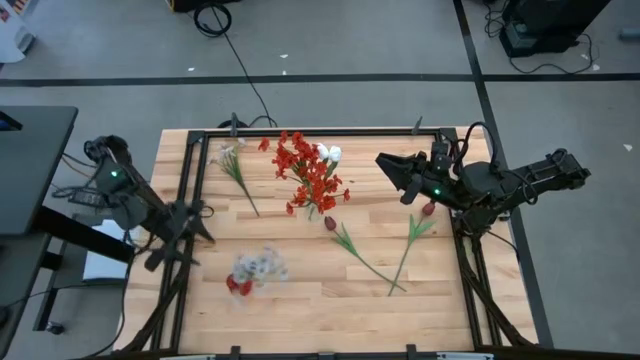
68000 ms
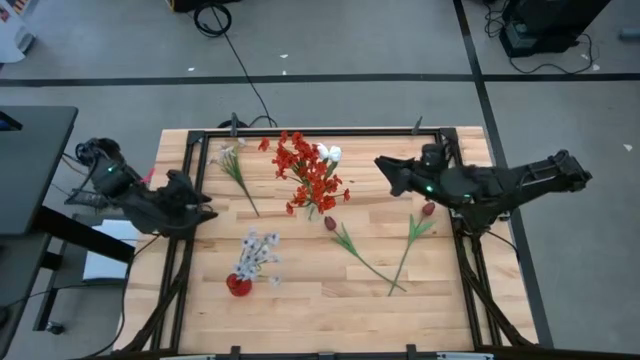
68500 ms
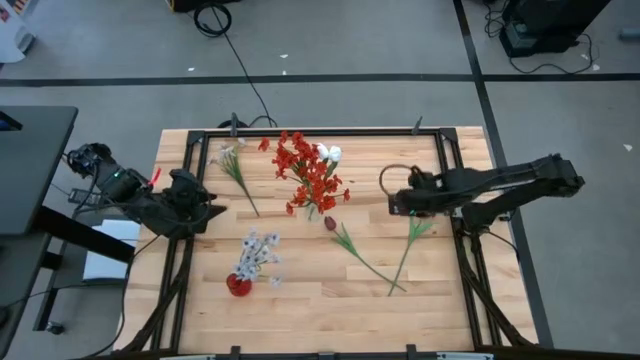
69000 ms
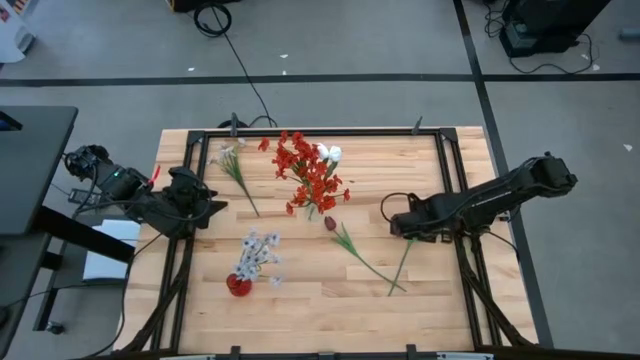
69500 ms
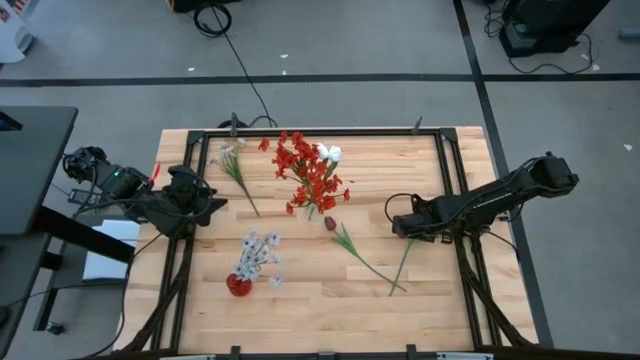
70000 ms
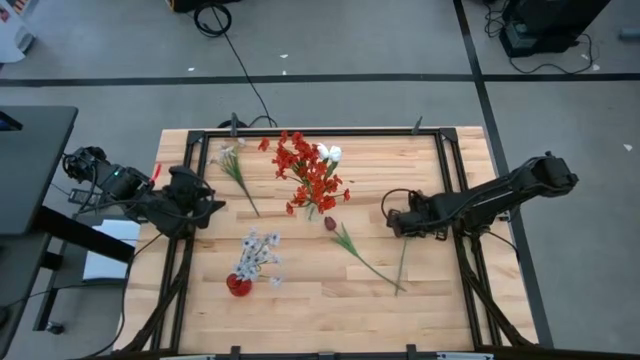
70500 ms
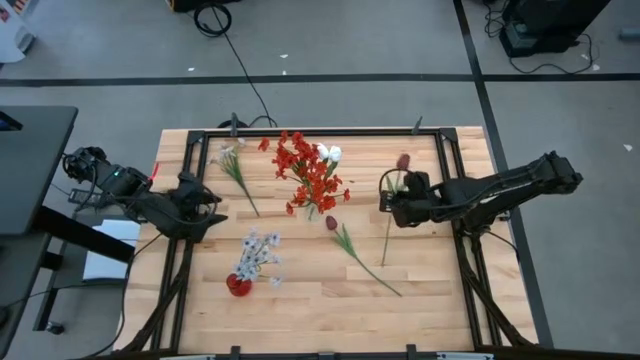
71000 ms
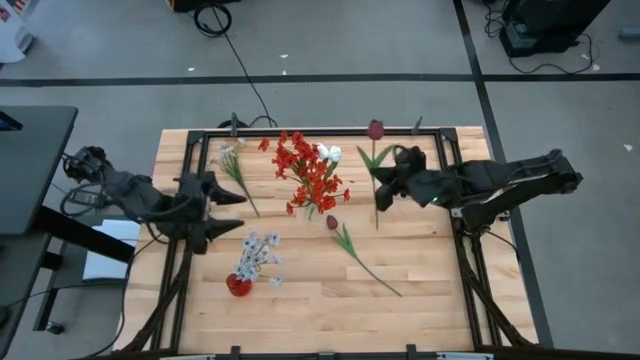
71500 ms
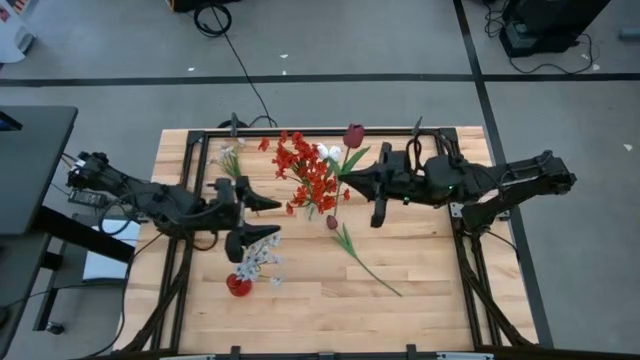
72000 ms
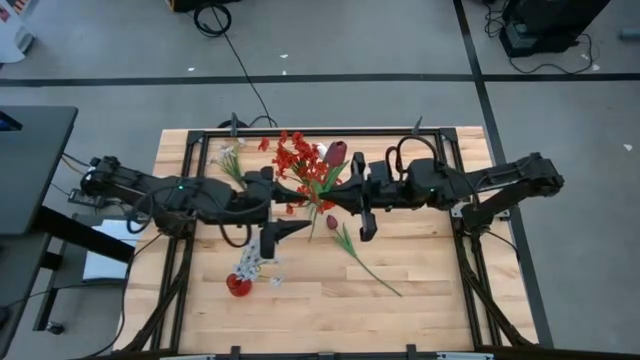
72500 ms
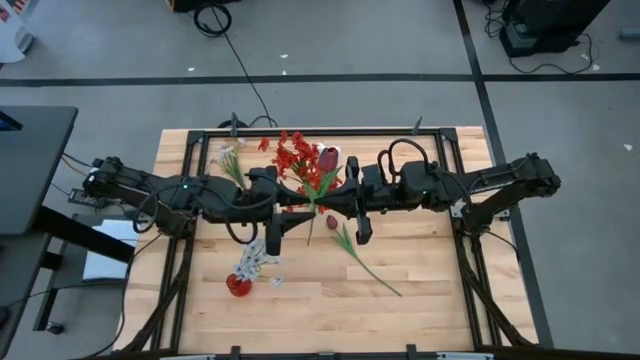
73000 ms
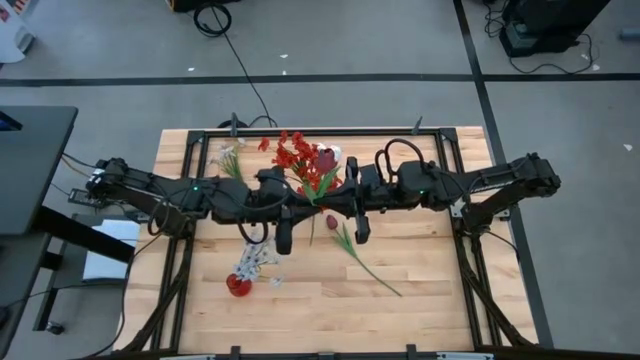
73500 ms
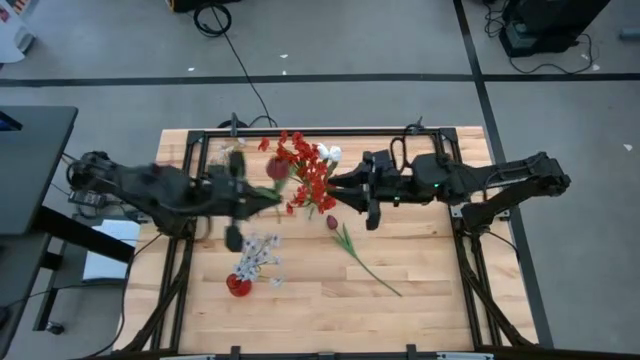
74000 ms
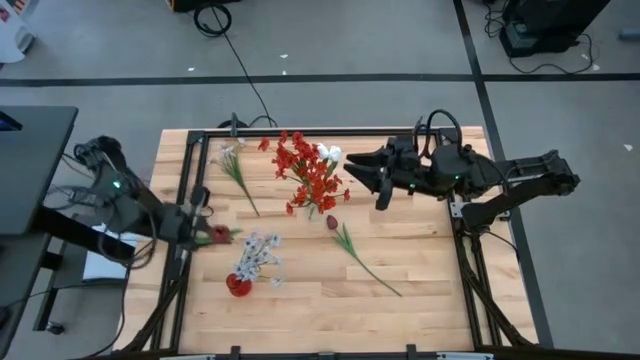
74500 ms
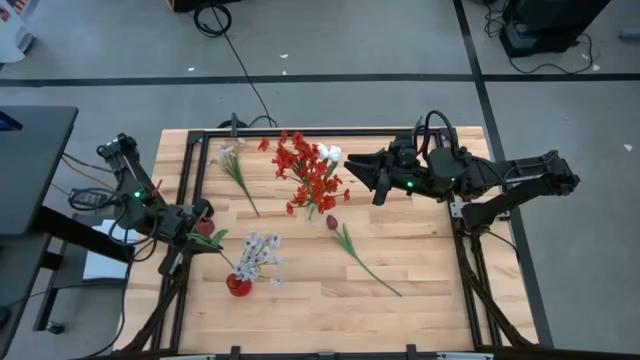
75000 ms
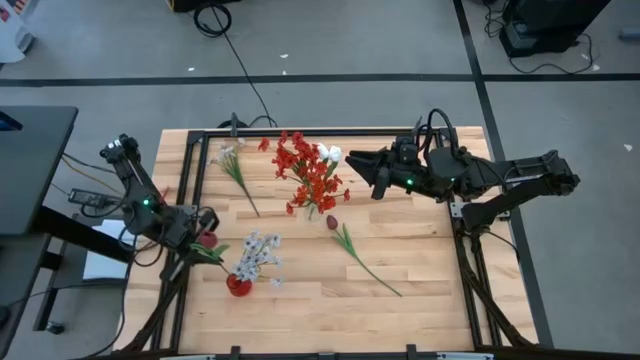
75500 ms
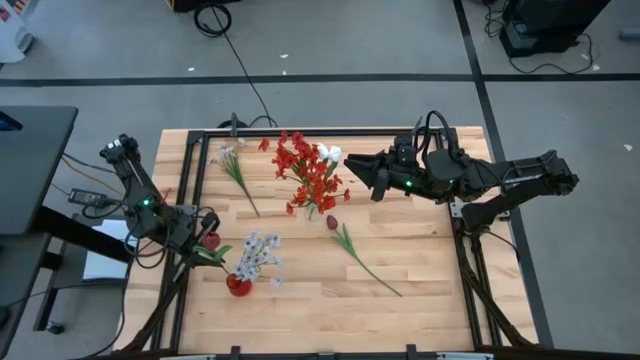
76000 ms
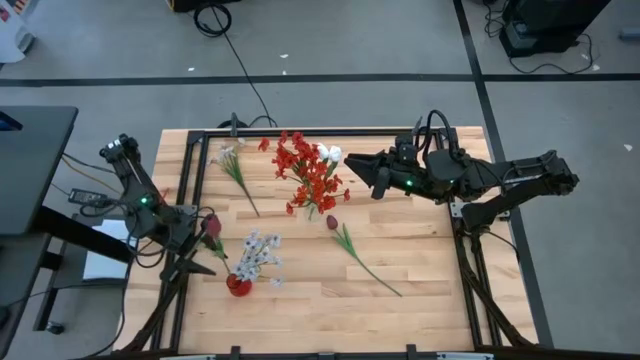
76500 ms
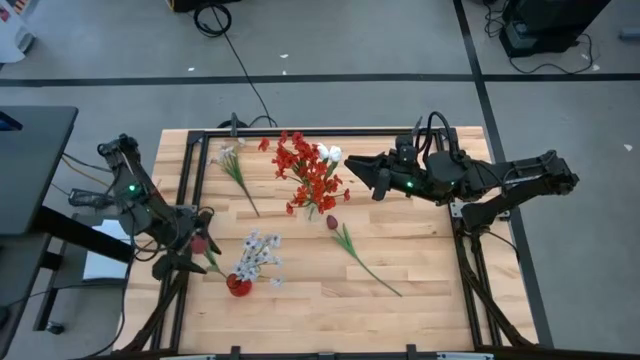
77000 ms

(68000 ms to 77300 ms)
Task: Sort flowers into vase by color
Put the right red flower into the red vase

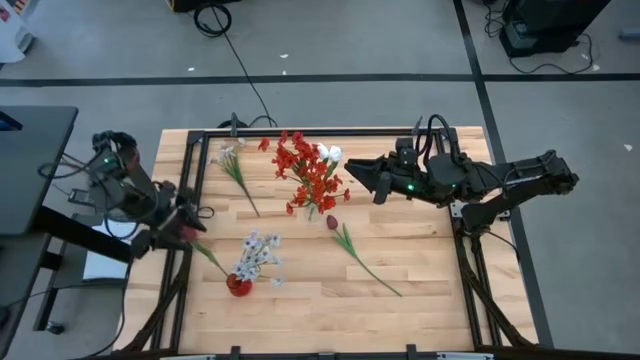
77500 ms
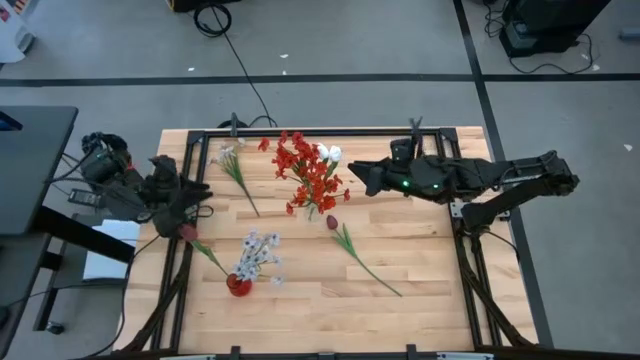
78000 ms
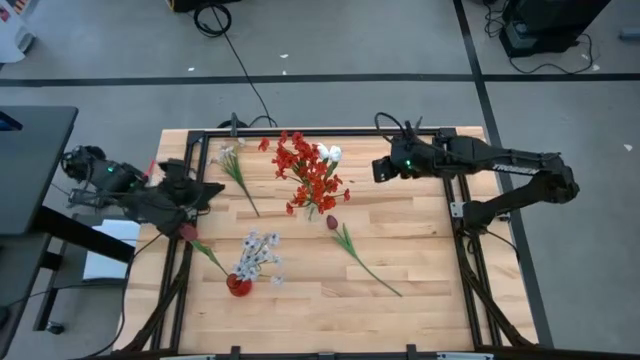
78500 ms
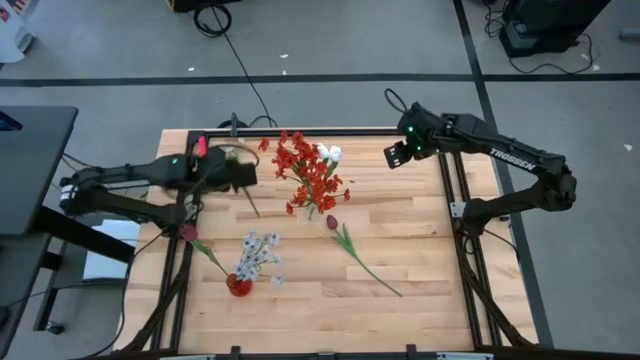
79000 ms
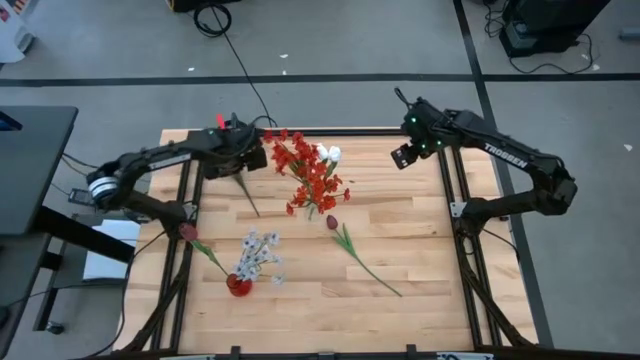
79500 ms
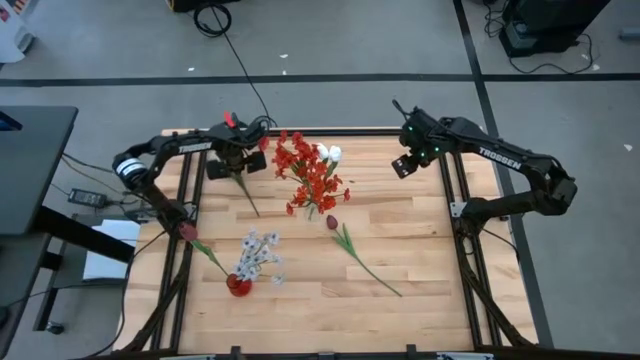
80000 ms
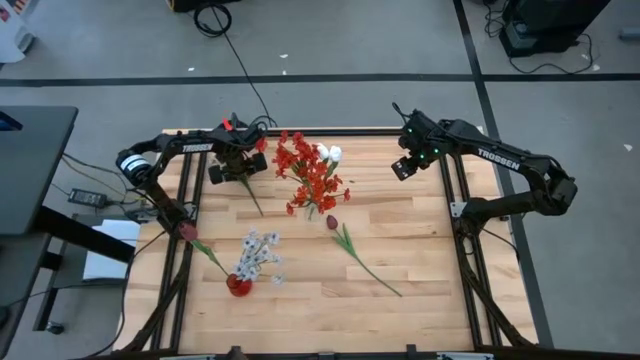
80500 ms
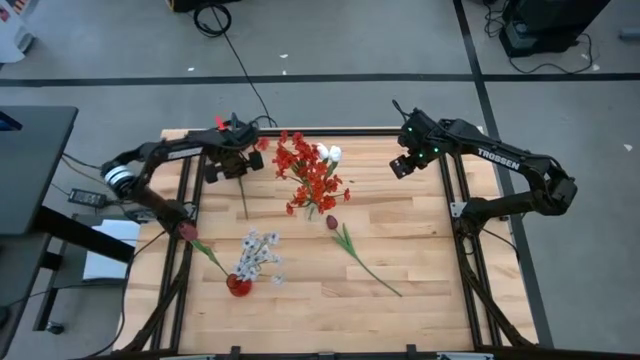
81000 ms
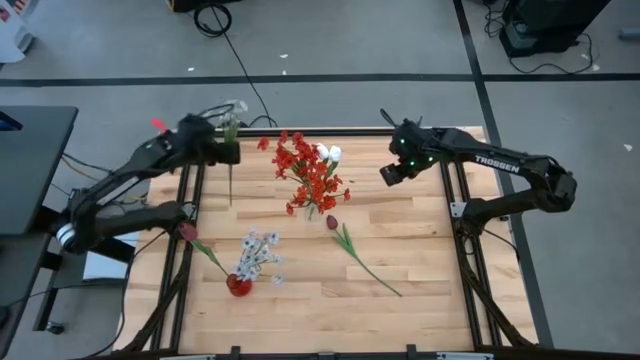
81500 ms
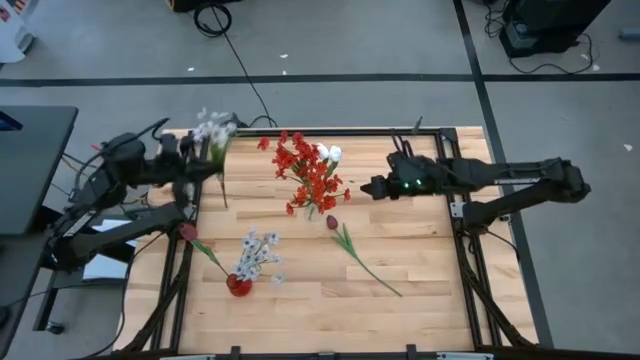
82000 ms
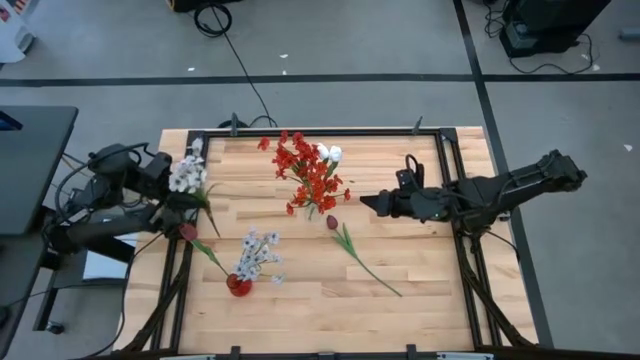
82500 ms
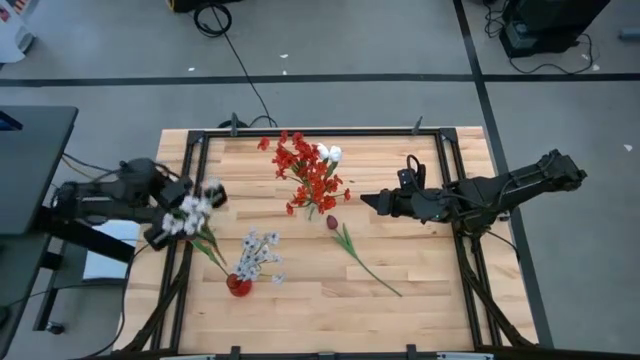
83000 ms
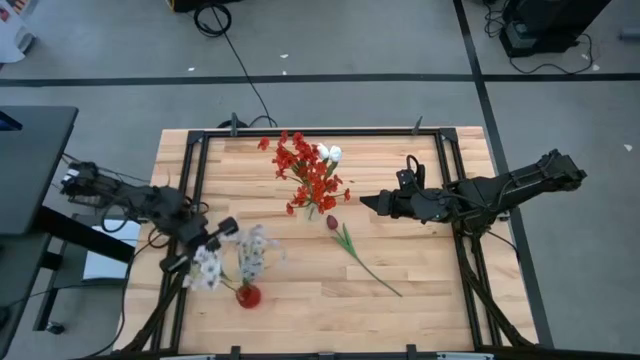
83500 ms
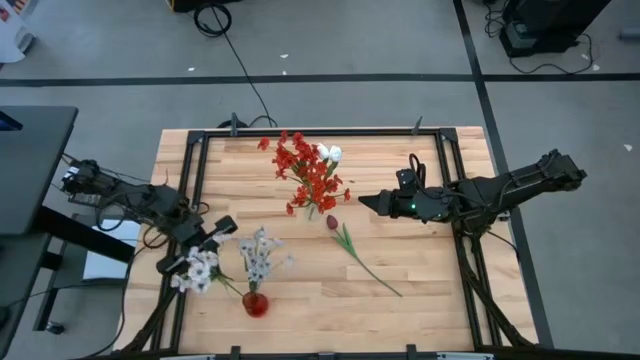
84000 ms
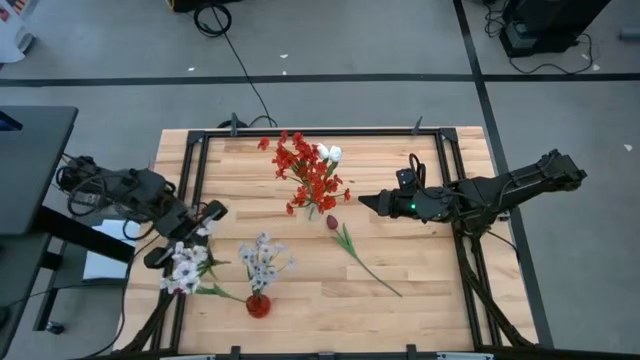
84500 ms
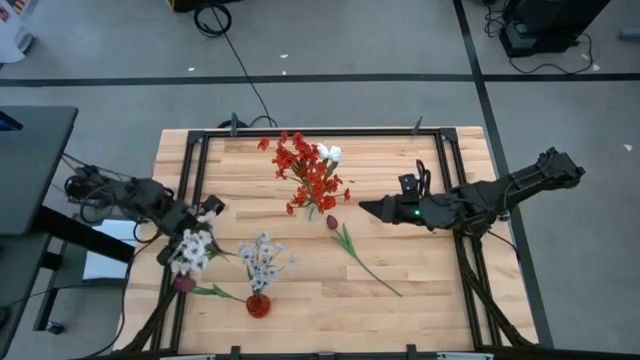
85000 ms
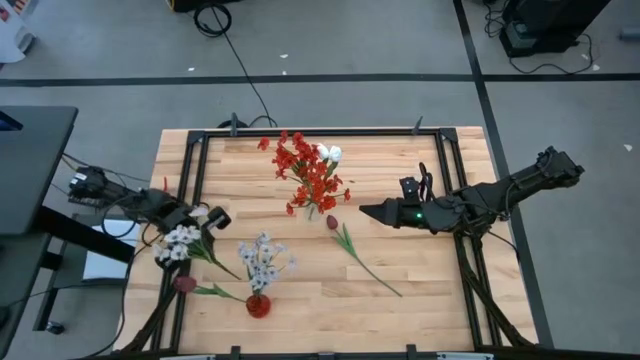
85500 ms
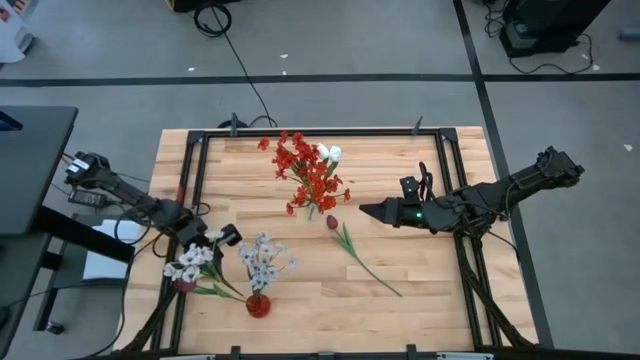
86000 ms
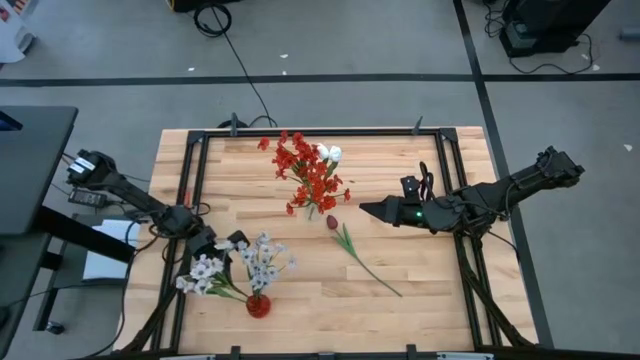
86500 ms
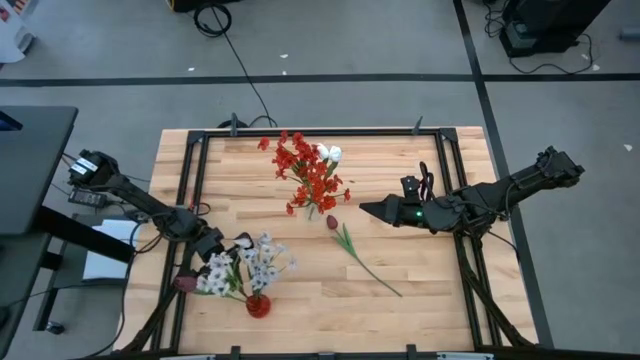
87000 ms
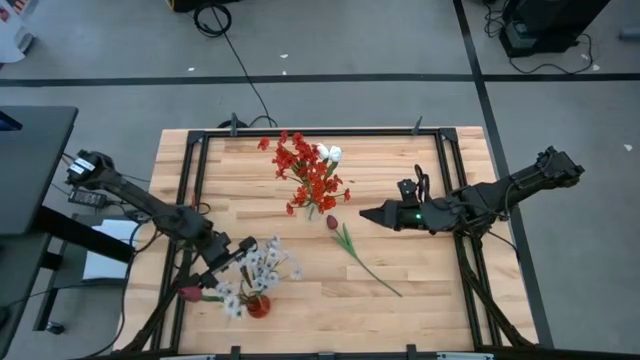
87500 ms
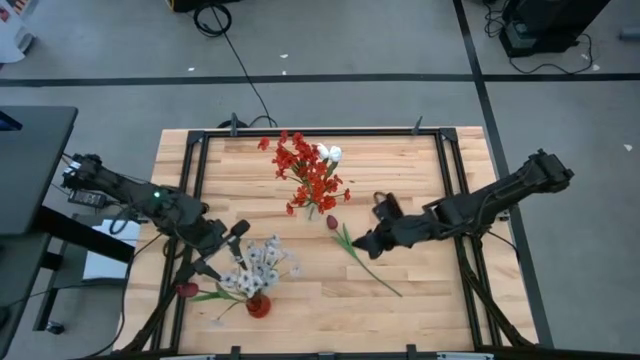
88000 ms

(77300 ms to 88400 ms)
Put the white flowers into the red vase
